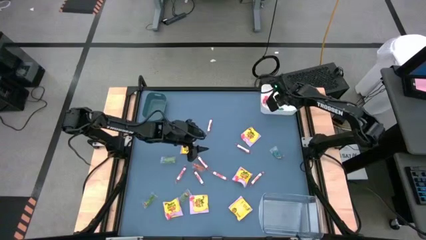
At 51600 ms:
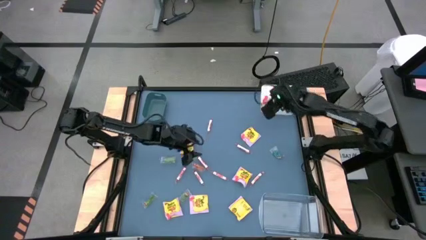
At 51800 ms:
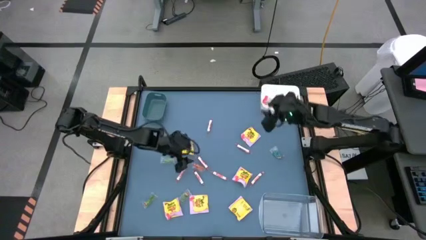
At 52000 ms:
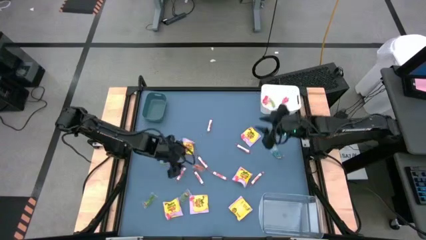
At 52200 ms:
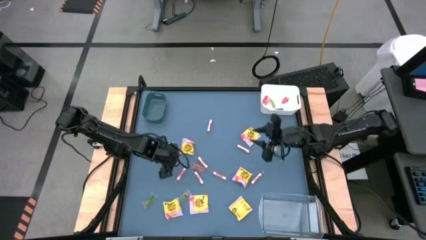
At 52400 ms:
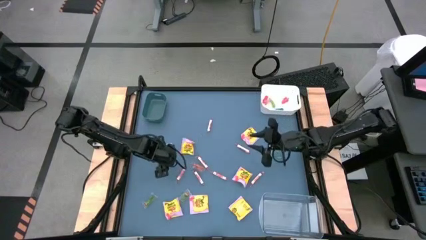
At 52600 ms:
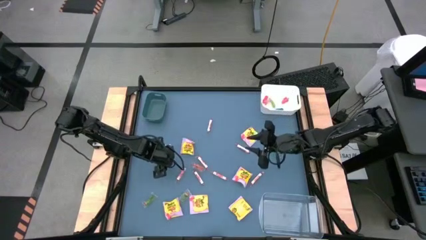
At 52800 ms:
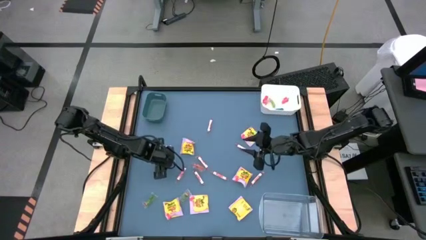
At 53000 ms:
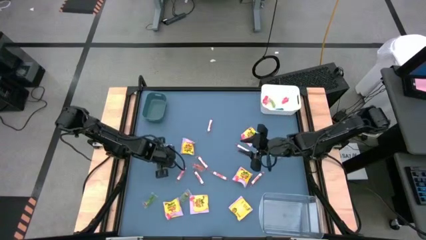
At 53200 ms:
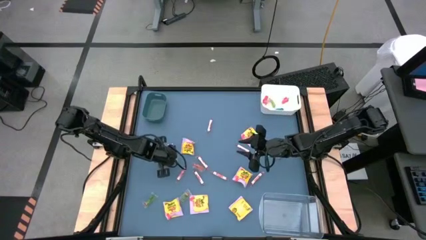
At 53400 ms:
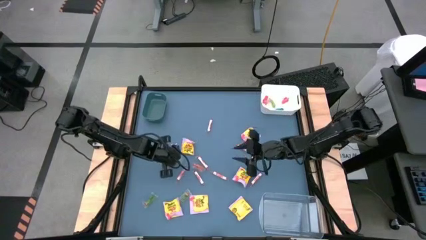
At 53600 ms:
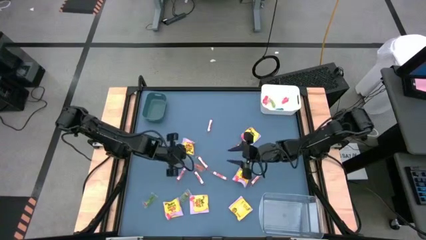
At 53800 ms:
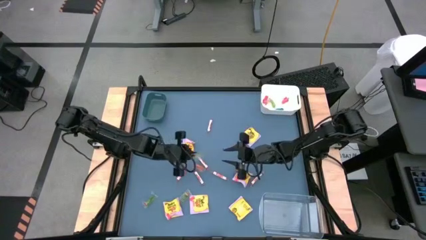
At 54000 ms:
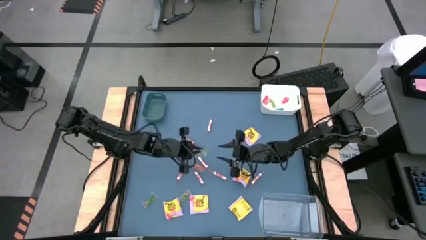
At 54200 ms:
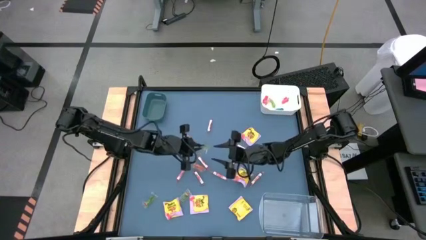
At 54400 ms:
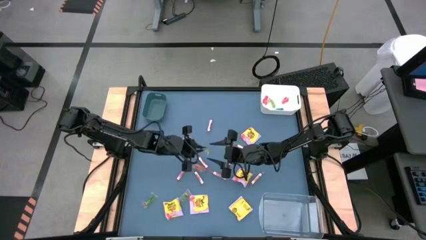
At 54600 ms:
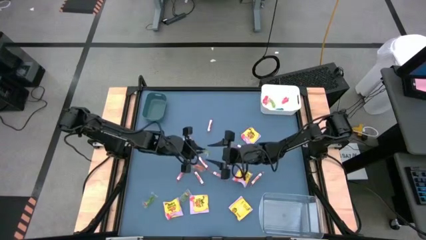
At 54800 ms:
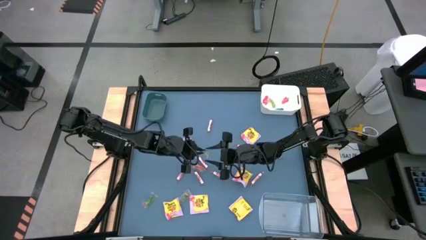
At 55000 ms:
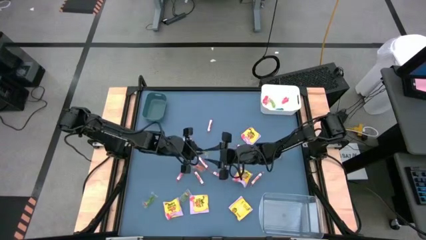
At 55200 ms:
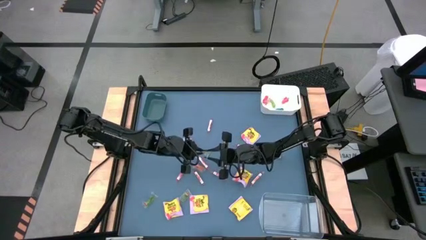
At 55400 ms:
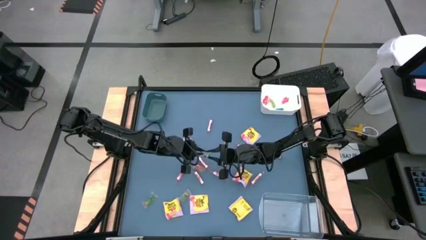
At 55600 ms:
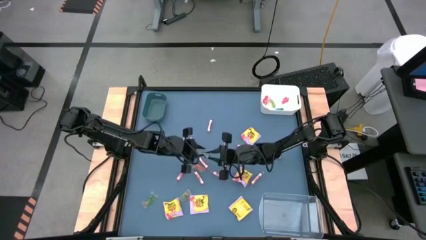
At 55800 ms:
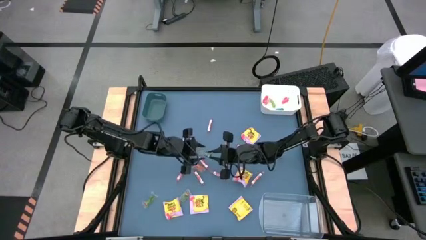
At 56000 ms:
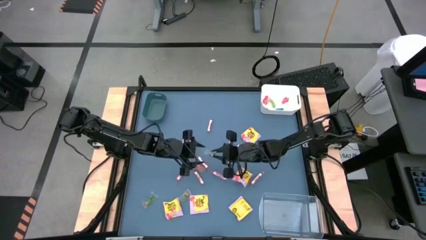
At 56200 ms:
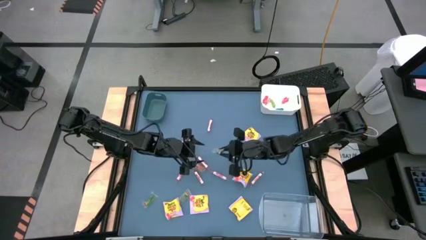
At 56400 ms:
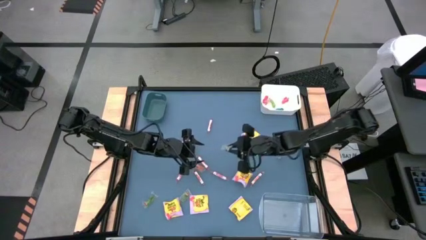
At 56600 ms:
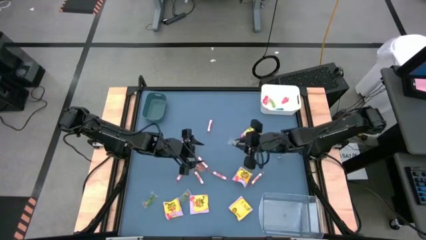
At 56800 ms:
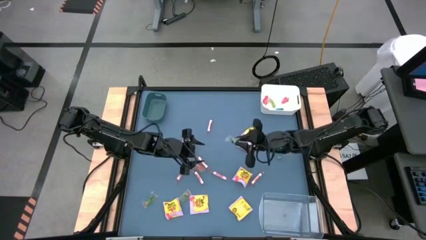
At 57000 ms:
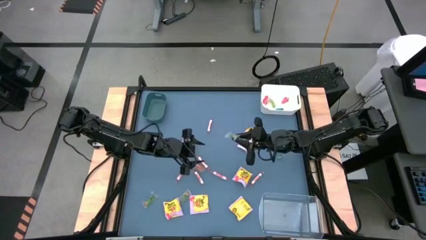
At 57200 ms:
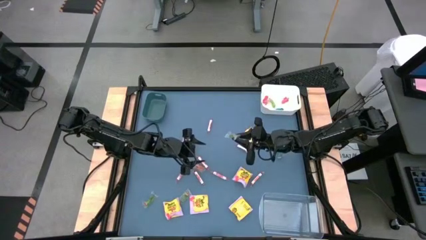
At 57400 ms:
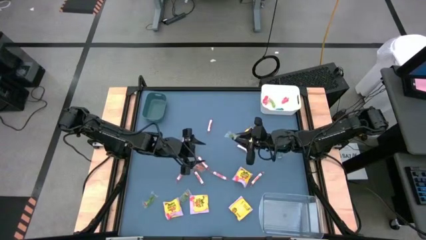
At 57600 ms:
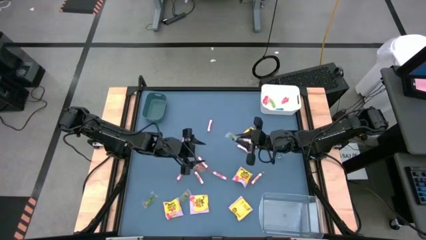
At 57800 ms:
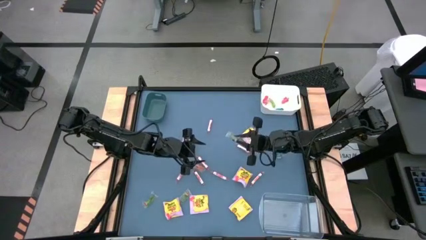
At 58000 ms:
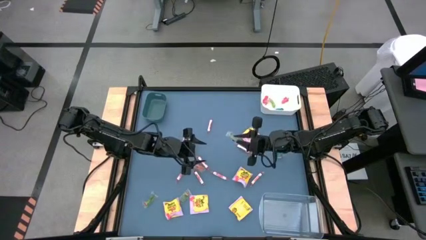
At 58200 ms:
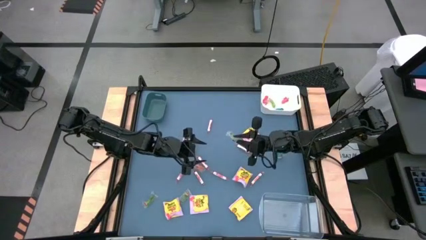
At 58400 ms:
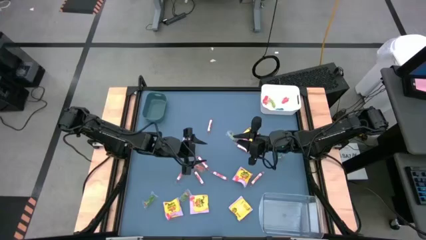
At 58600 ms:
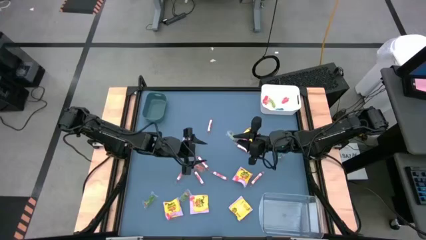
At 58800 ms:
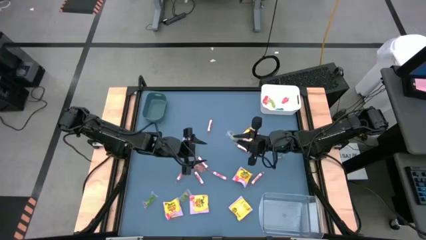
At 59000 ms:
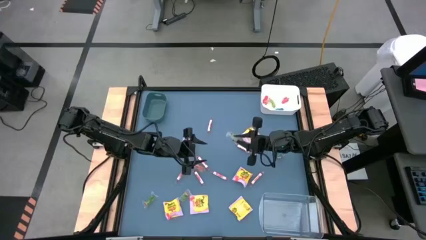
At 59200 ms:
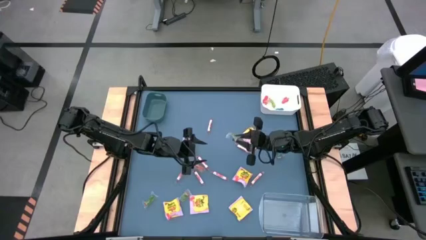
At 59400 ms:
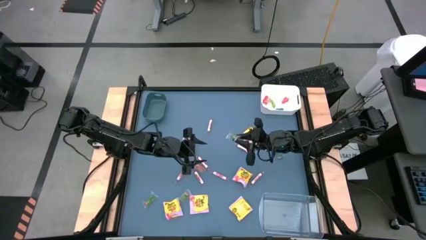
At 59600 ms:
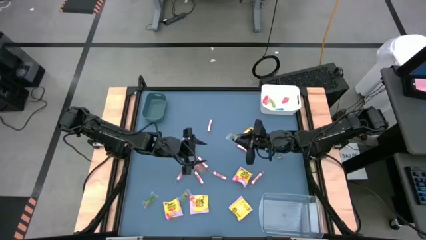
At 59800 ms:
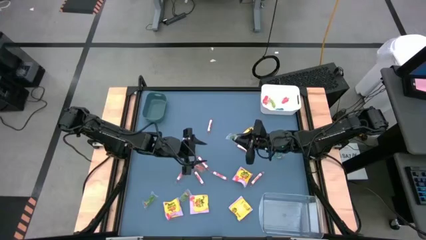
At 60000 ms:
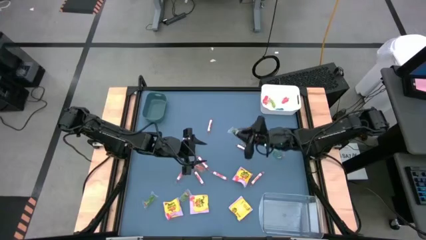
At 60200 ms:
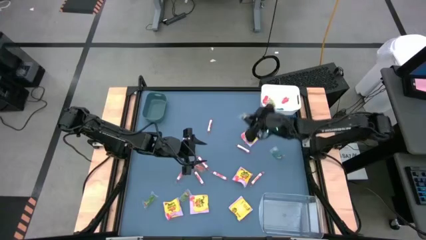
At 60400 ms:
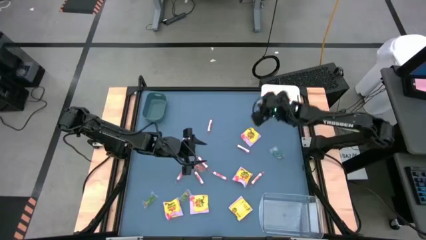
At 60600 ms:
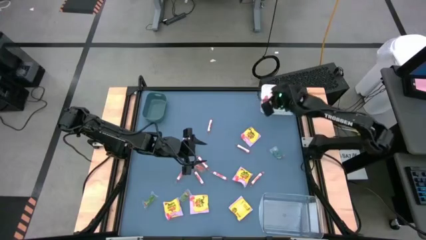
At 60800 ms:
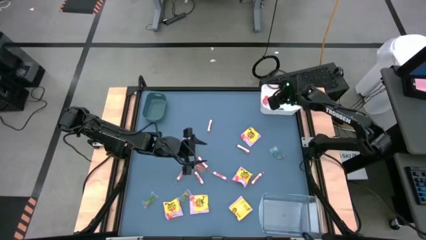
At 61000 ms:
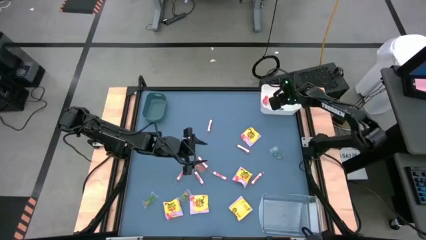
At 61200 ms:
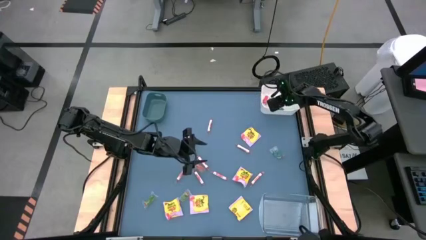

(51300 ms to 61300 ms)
Task: Sort candy
Put the green gummy into the white bin

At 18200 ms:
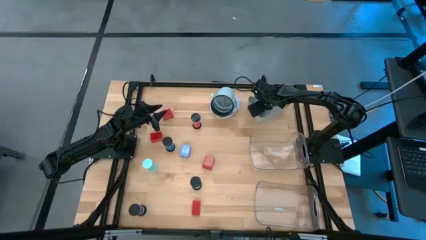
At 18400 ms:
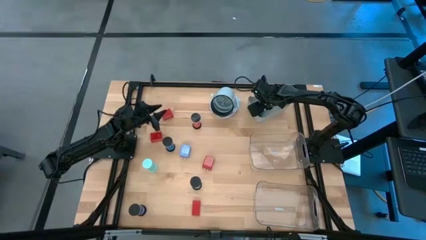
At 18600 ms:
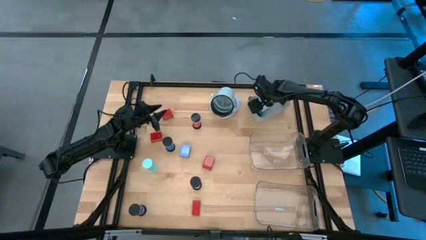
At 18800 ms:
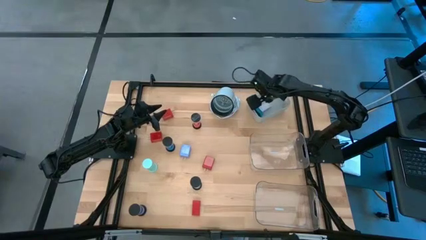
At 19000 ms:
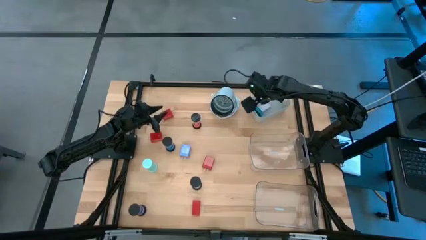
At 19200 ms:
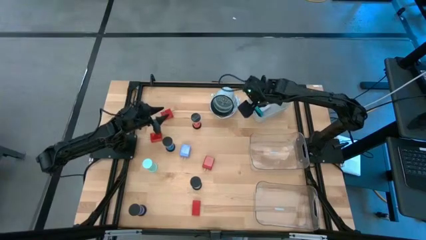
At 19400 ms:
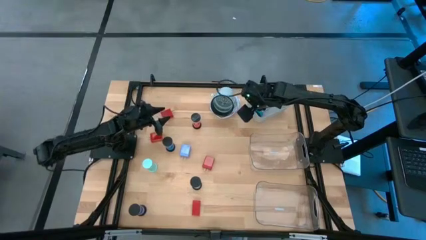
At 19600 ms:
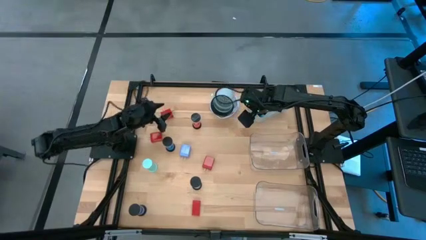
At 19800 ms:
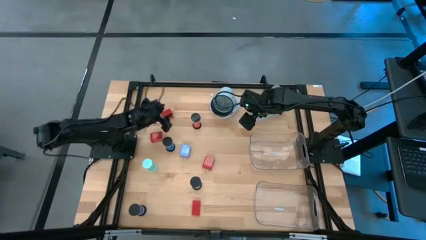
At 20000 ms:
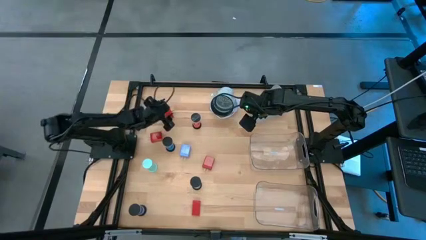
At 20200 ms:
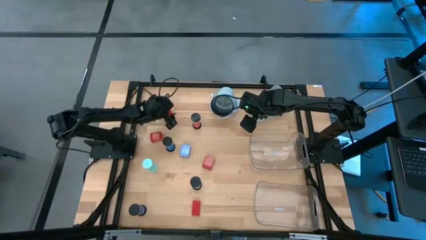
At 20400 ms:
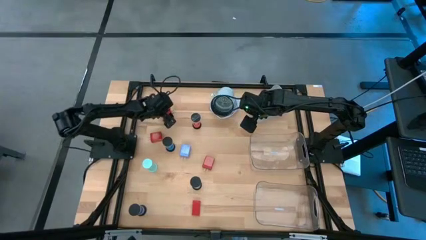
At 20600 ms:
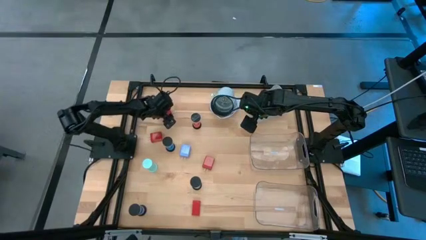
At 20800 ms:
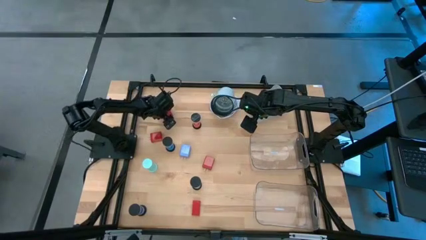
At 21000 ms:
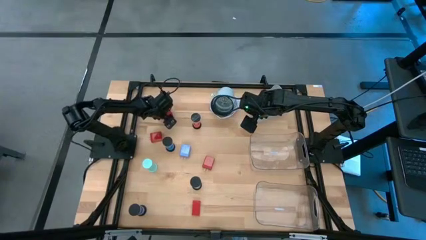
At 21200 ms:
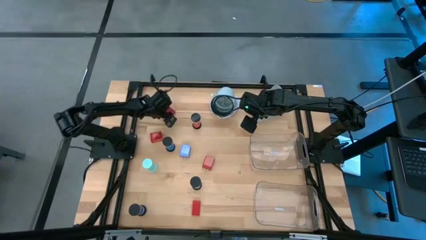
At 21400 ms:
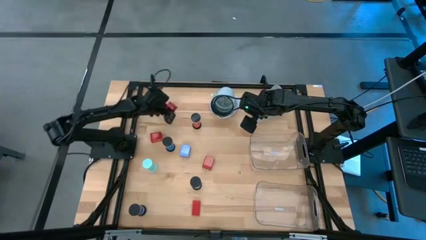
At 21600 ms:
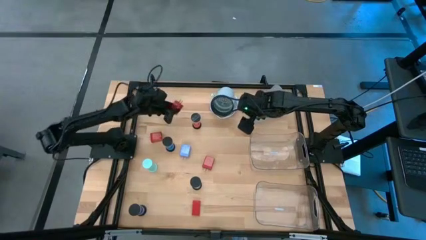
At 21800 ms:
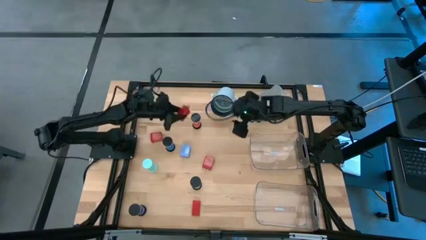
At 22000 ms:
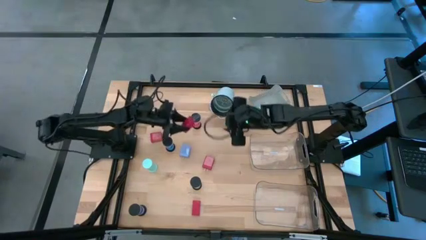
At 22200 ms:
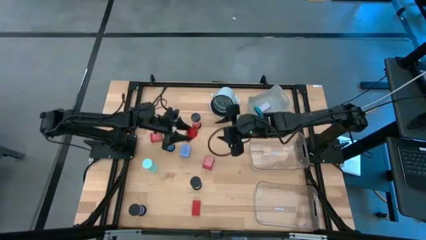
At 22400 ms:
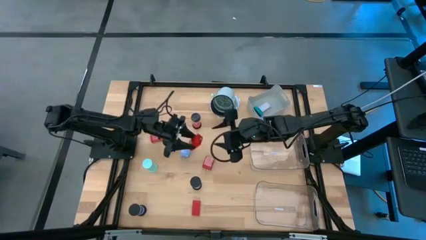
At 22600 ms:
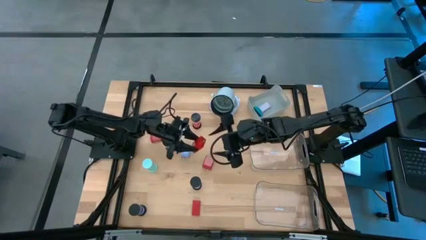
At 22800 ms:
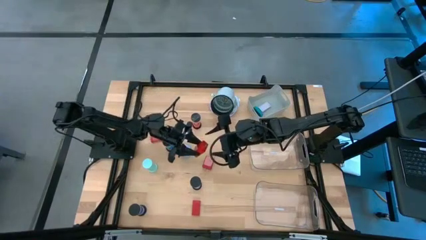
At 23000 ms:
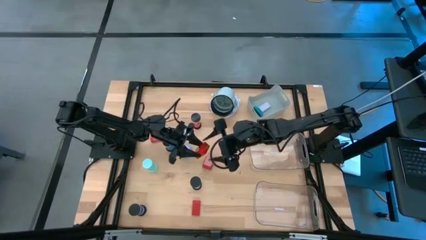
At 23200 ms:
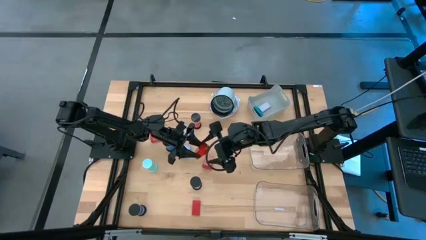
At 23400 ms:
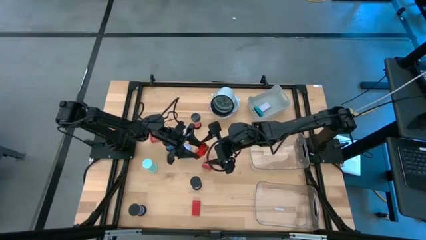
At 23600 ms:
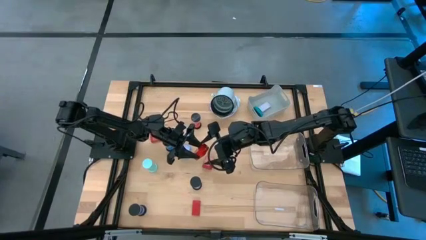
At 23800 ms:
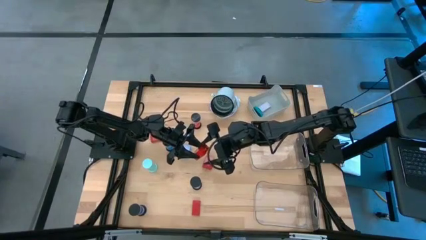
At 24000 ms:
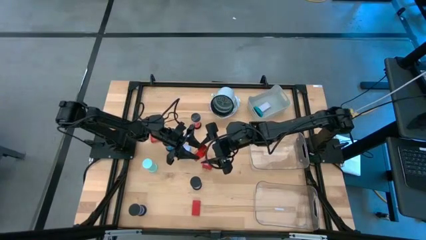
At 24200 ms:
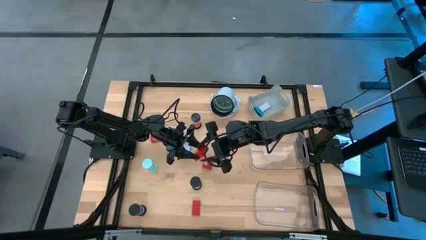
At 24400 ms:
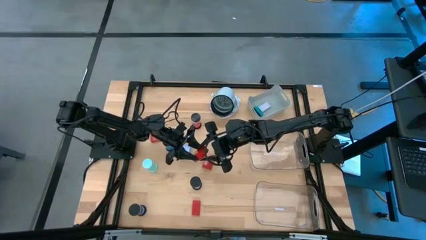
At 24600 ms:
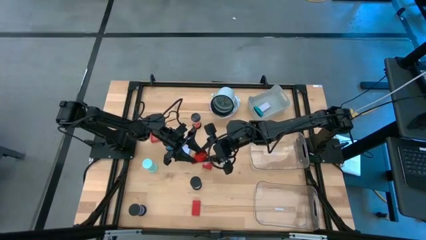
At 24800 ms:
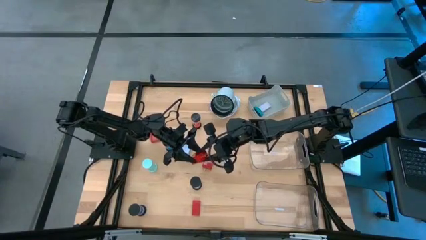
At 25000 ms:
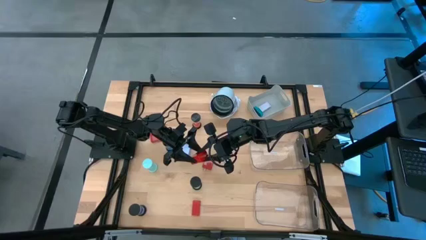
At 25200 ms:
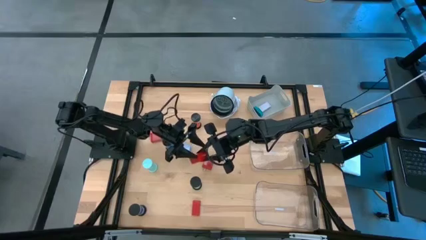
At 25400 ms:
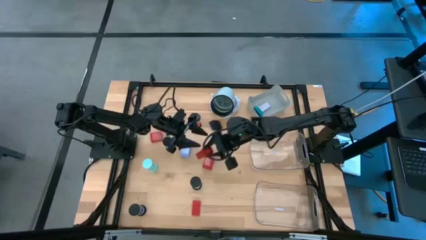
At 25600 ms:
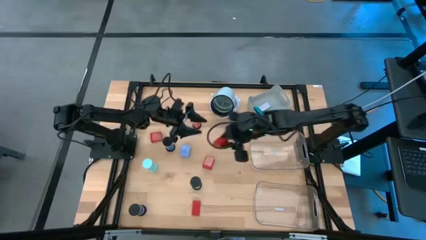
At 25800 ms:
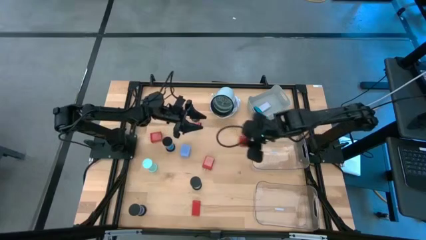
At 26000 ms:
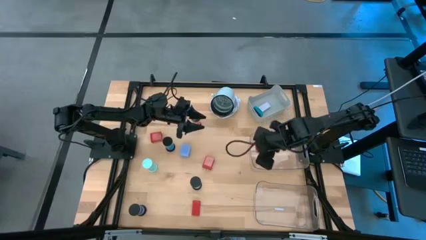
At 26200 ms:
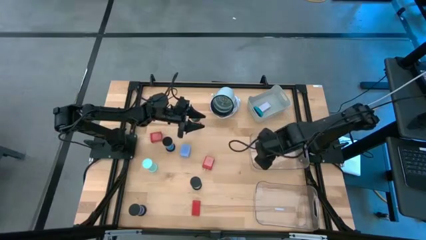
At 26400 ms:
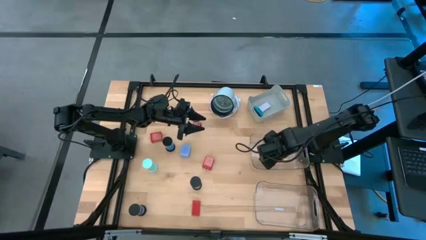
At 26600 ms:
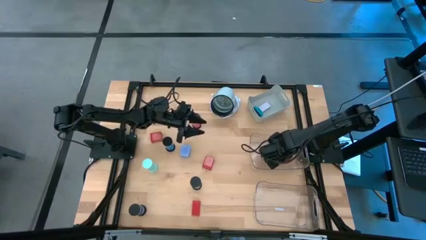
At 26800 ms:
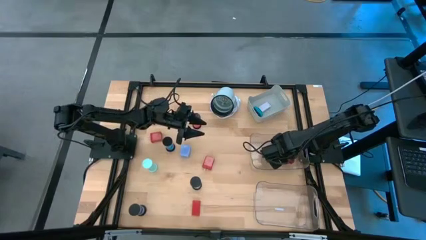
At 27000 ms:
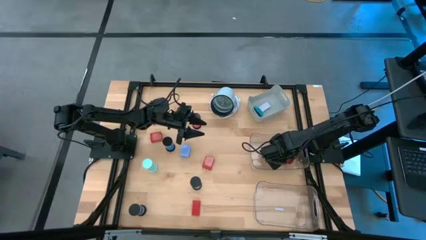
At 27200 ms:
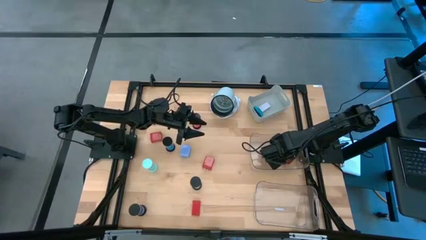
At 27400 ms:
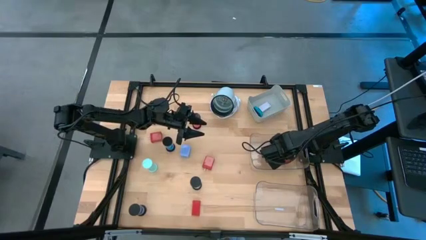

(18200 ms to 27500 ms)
Task: Pick & Place Office items
Put the top red charger adapter into the top transparent bin
